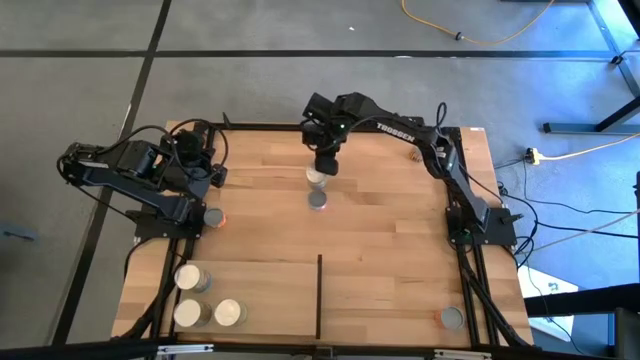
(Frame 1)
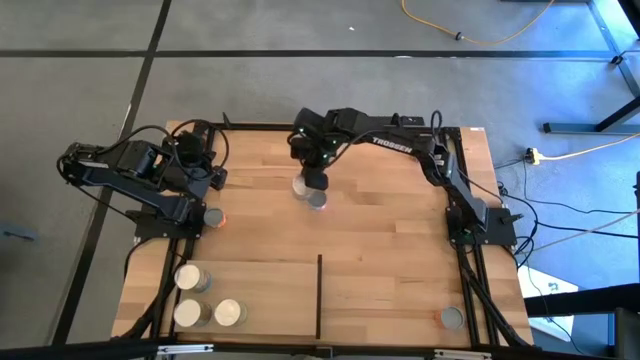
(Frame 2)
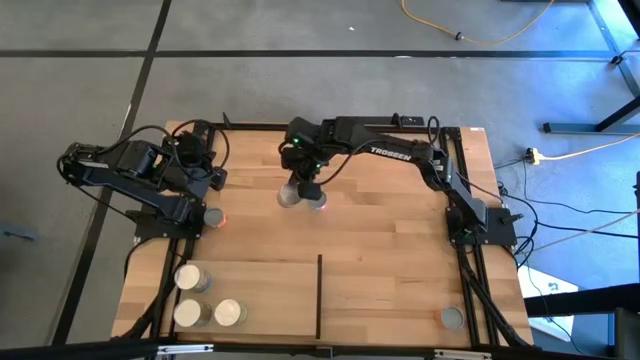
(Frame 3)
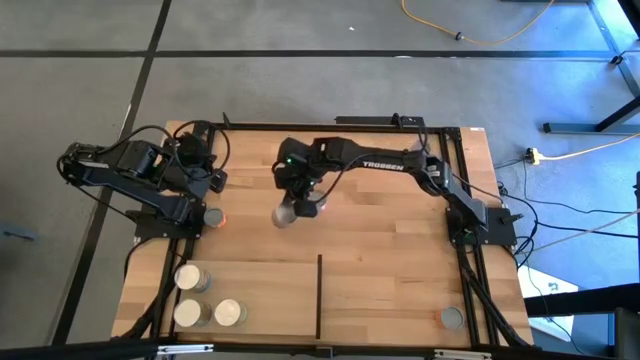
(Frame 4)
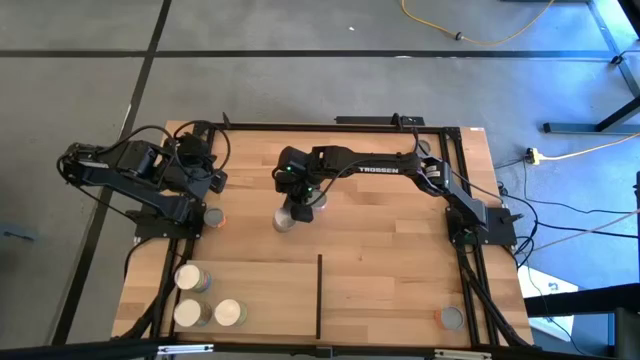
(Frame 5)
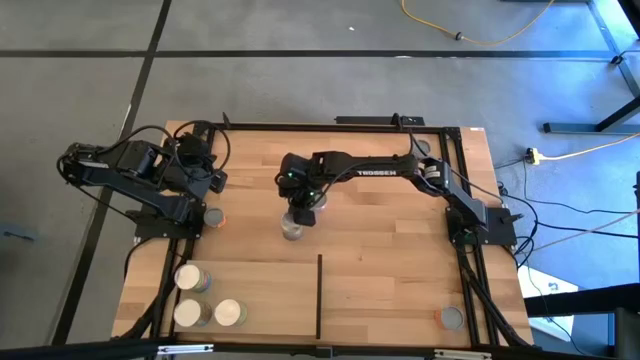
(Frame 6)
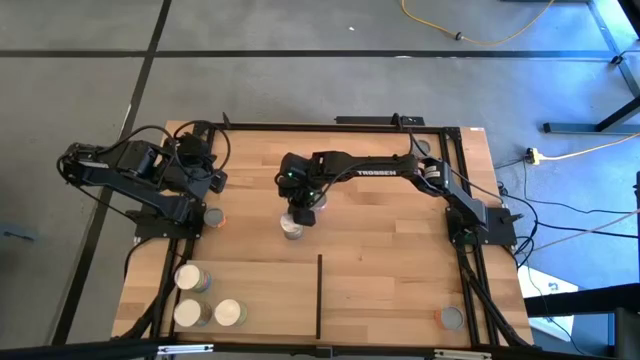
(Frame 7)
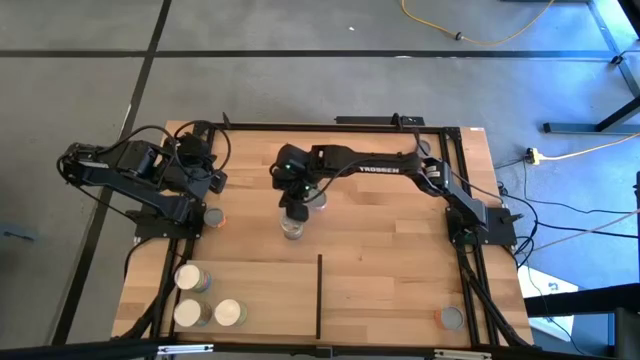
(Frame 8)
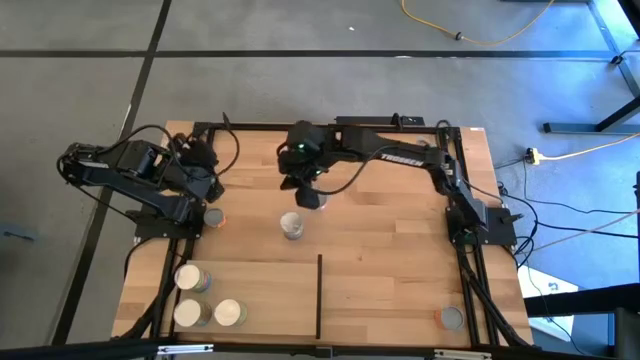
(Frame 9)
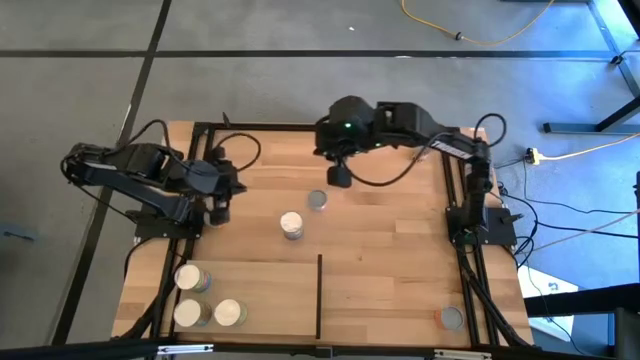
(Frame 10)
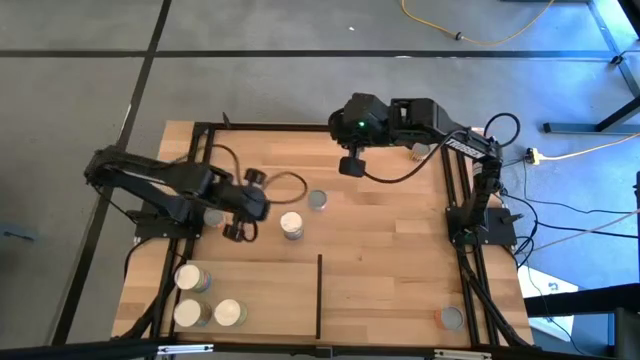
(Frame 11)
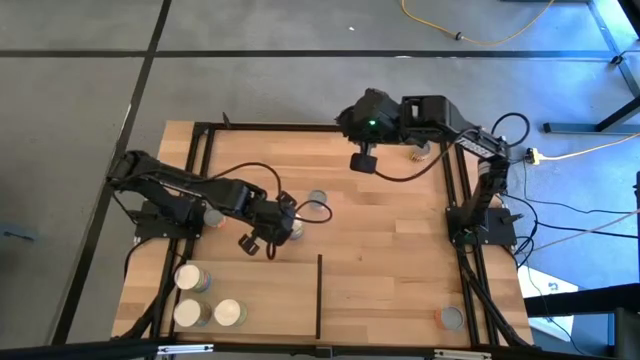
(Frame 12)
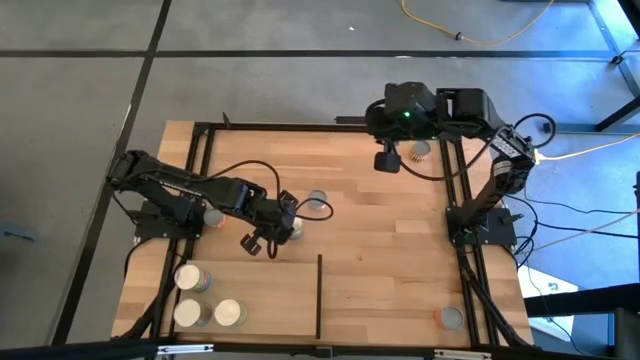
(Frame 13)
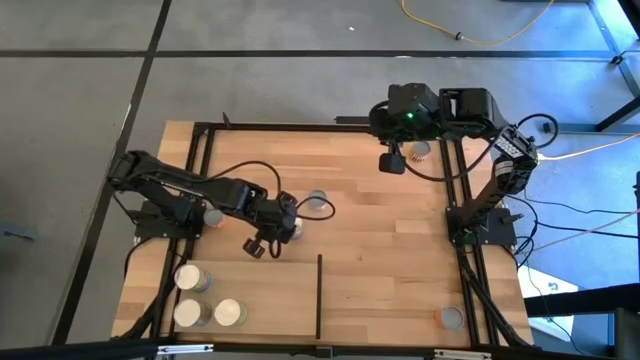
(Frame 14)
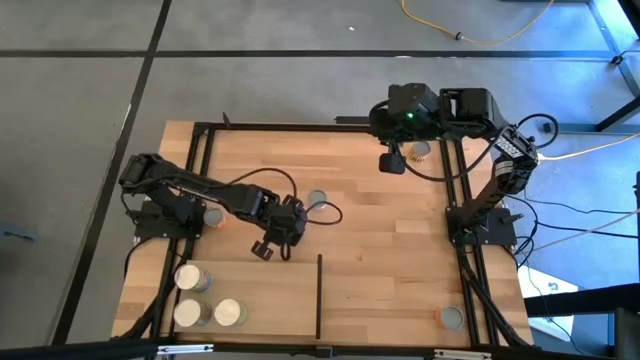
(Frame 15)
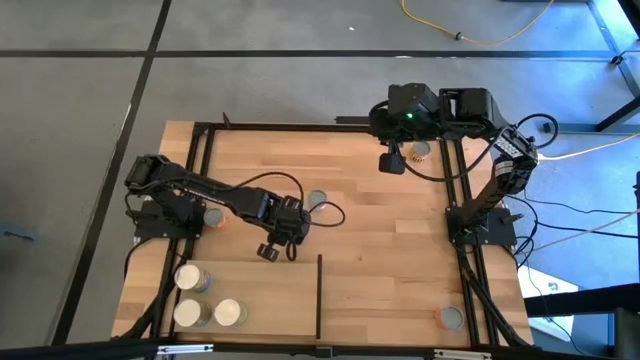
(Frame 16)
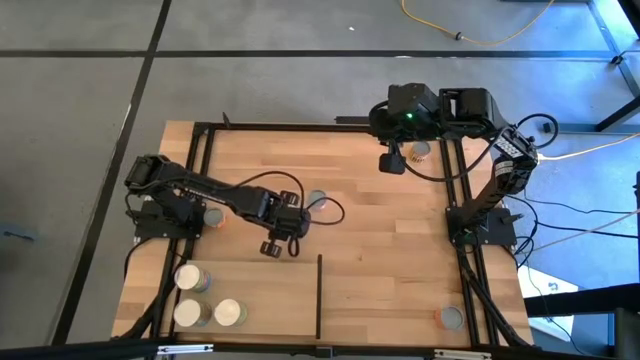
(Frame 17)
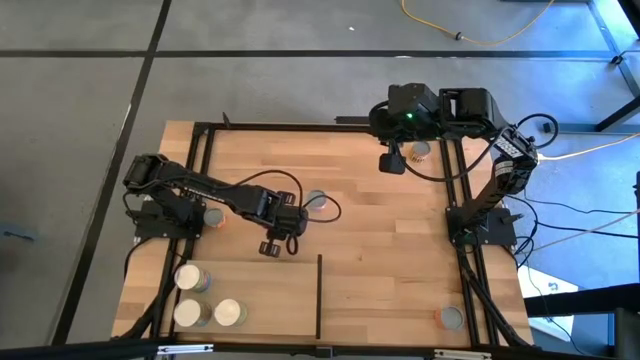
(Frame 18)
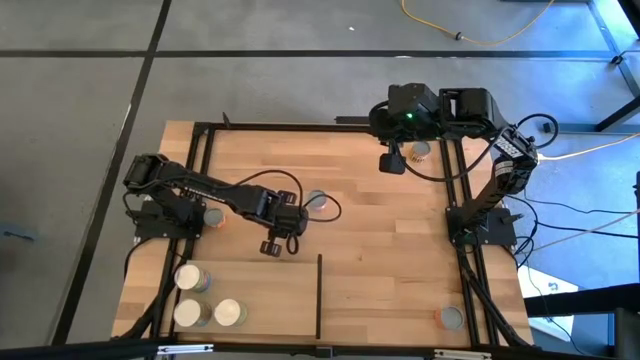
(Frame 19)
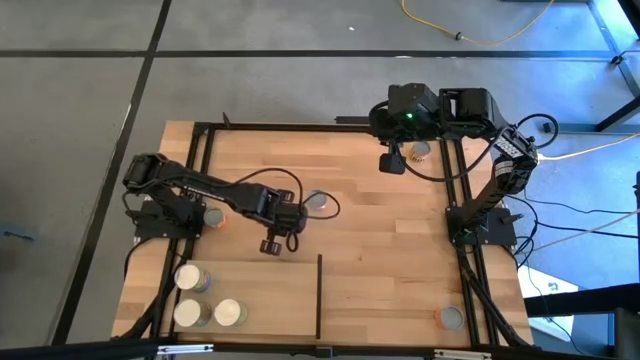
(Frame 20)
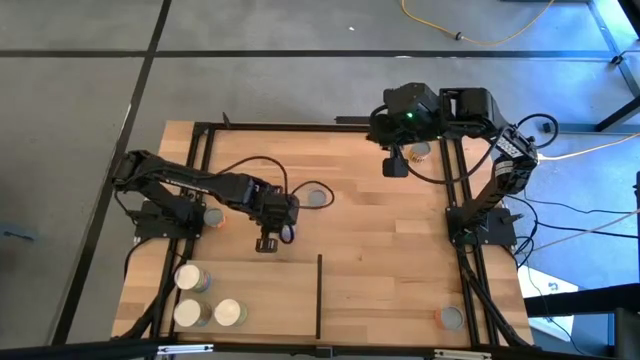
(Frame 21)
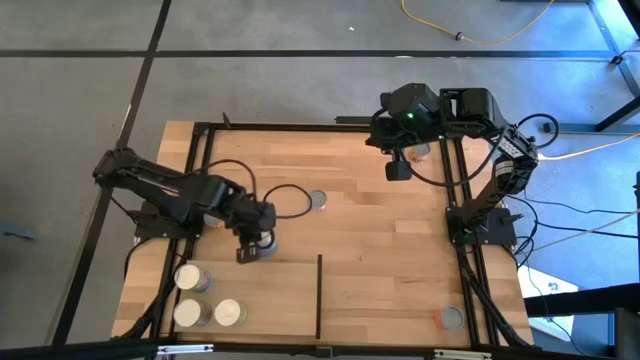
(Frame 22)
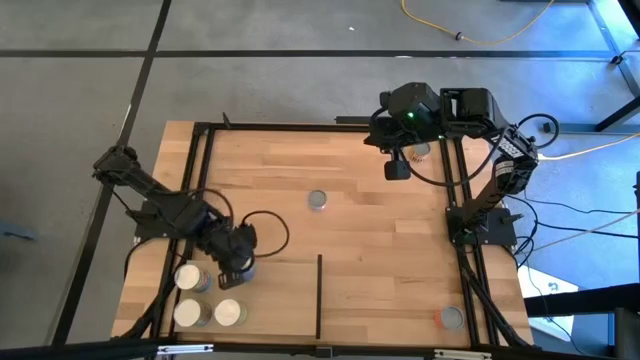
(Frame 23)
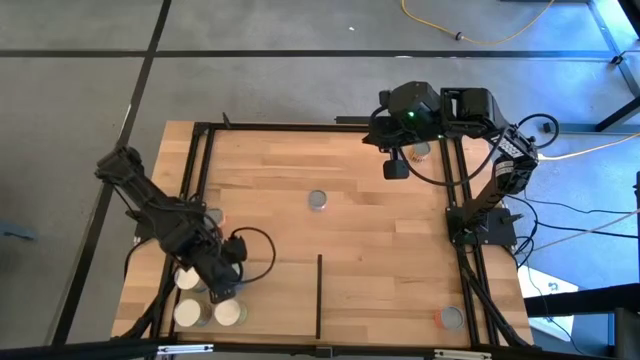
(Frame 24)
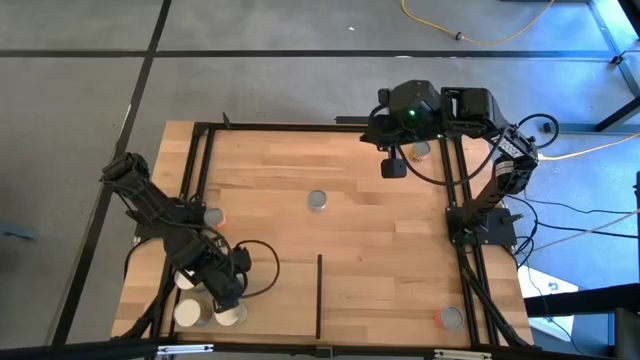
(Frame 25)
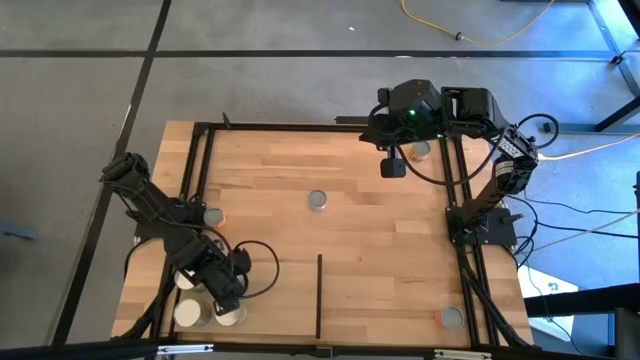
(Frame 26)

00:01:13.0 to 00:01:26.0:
Task: Pick and place cans onto a shelf
Put the canned peas on the shelf

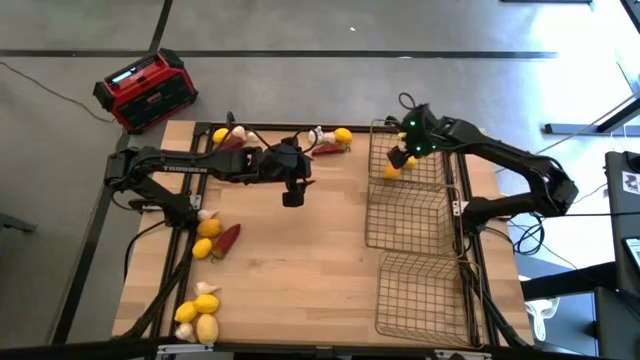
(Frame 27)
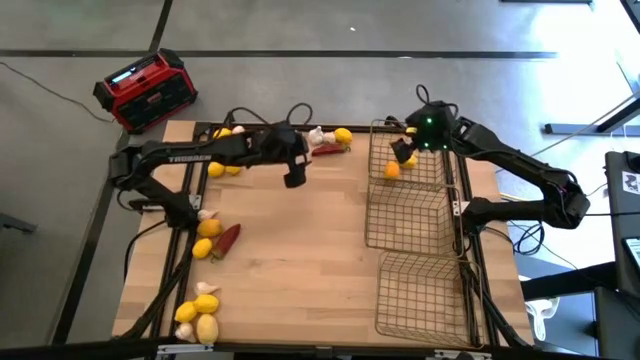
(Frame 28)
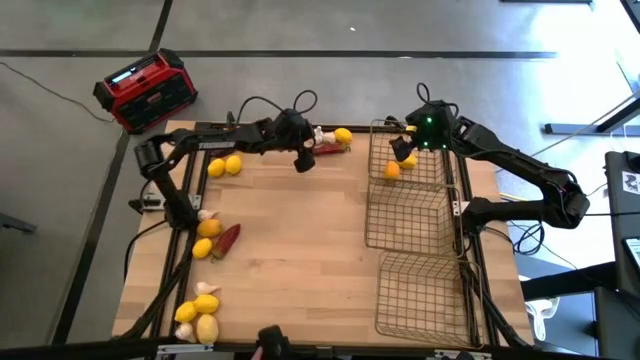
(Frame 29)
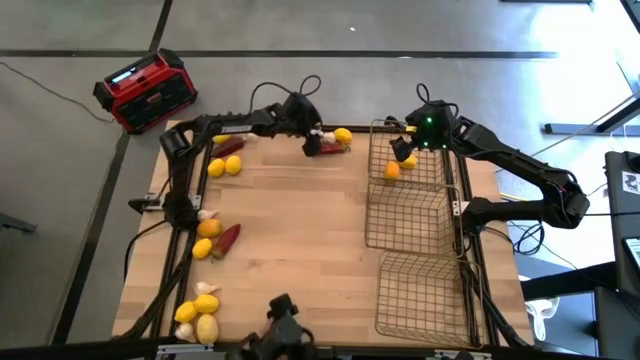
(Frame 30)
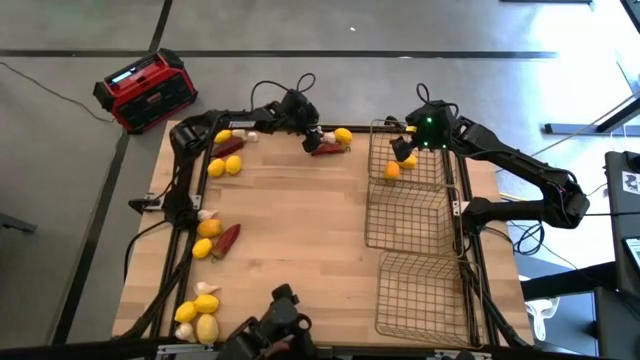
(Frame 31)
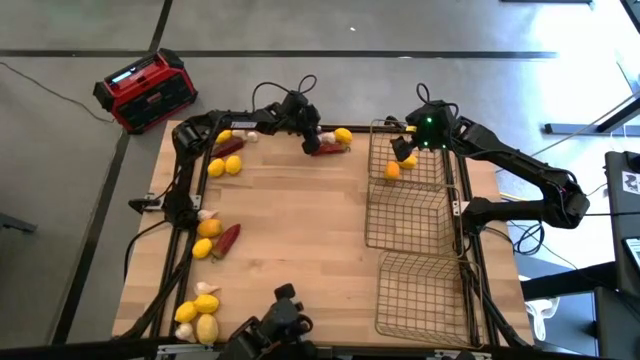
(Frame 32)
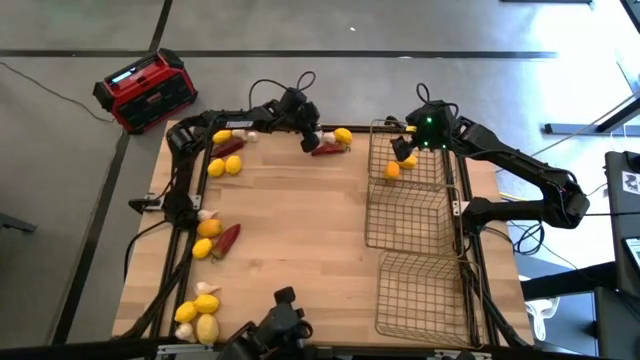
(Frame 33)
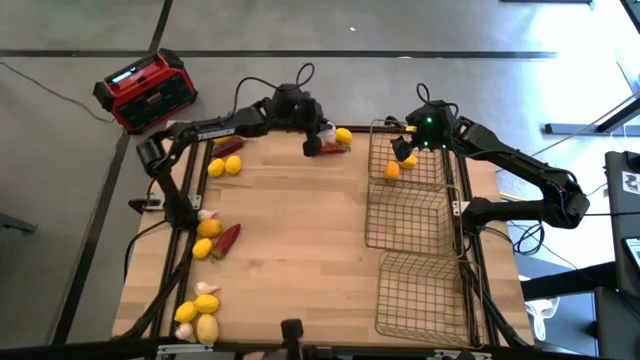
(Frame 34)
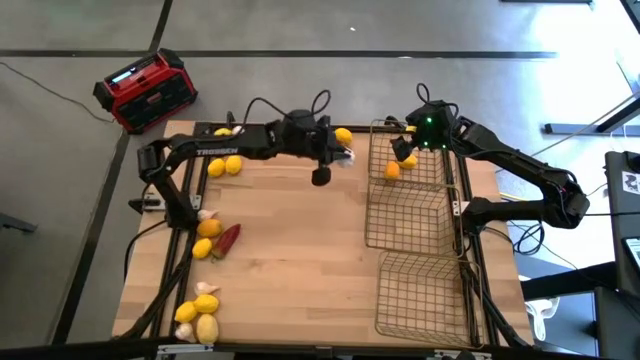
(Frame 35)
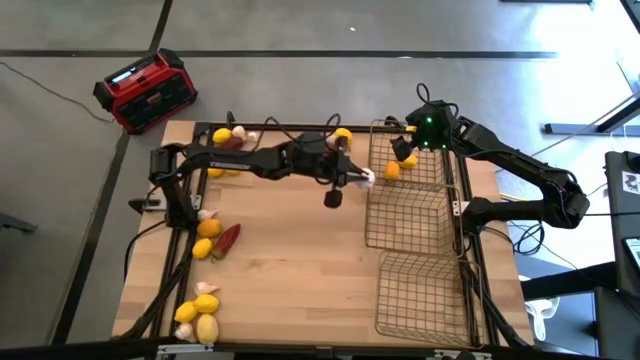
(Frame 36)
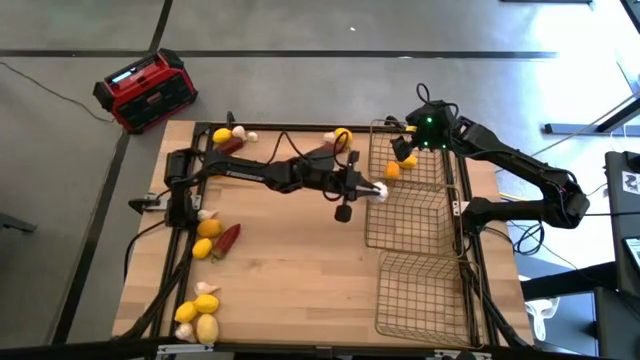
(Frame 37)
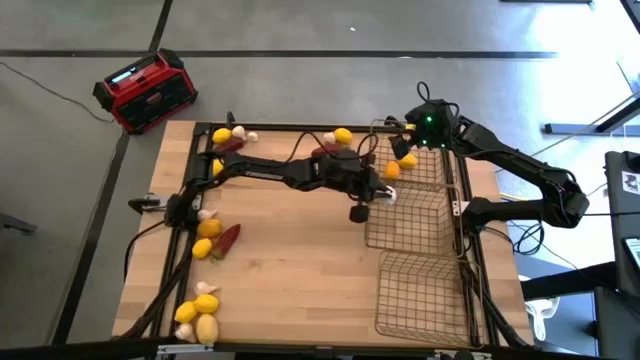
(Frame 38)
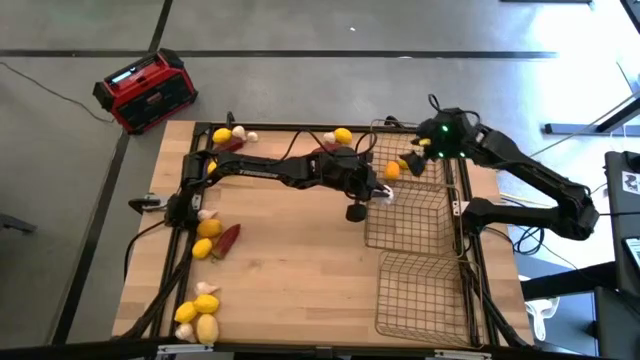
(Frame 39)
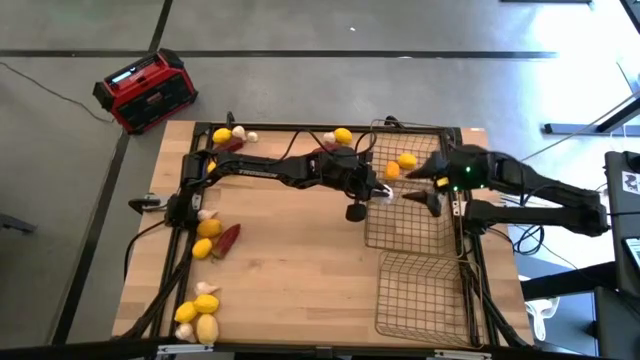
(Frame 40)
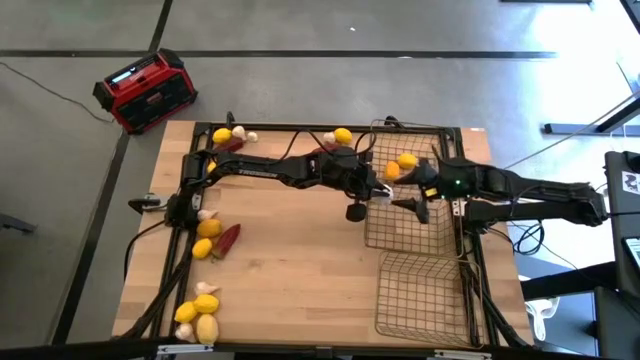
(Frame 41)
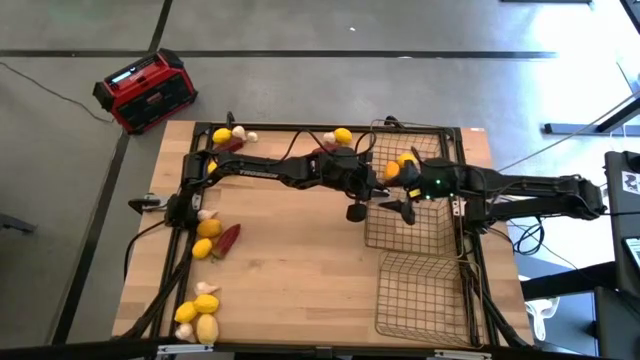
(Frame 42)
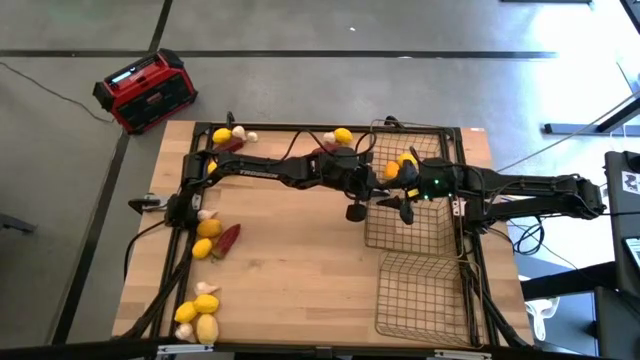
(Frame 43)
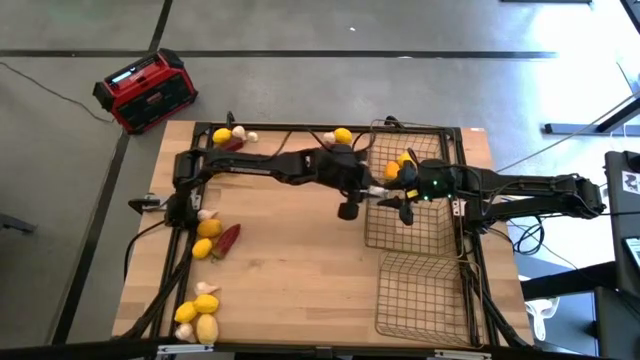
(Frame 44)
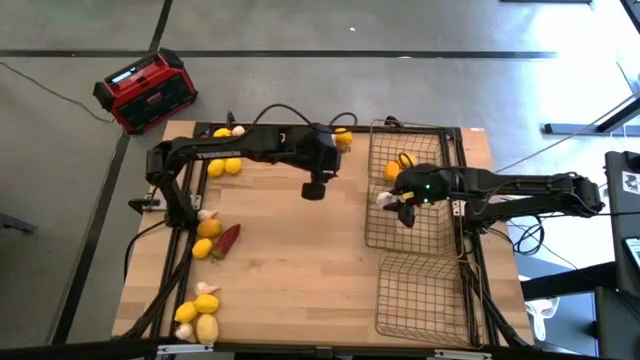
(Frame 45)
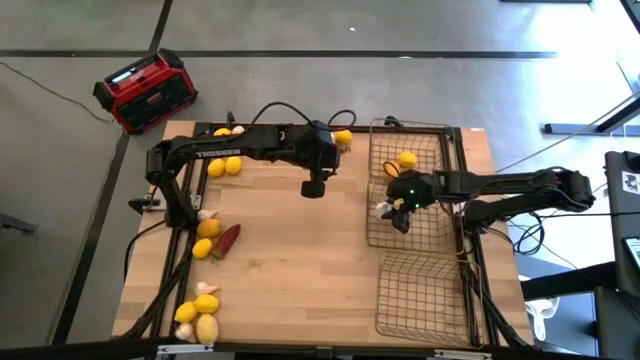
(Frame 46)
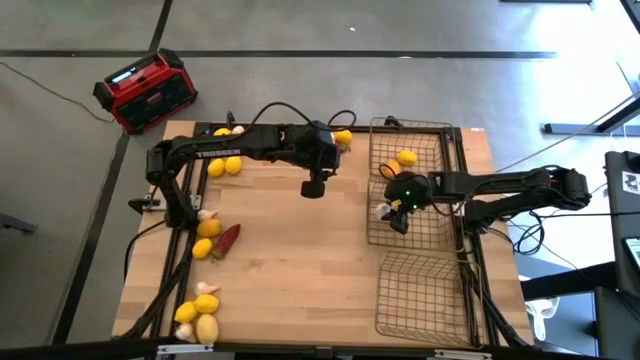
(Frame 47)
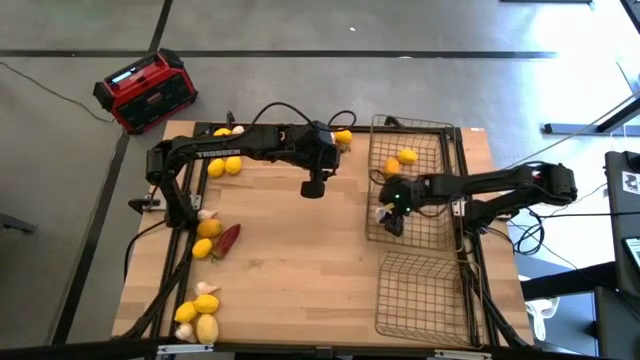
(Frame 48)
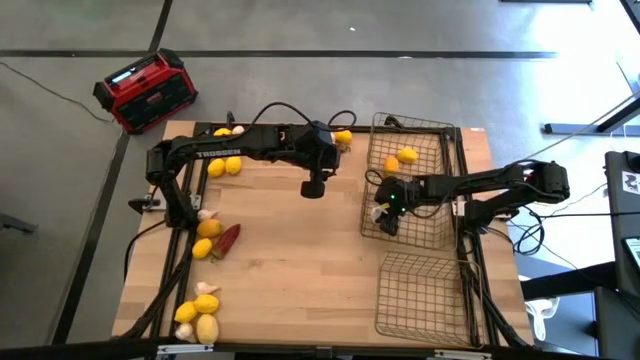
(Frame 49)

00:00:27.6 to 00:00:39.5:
Task: Sort produce into baskets
Put the white garlic into the middle wire basket
